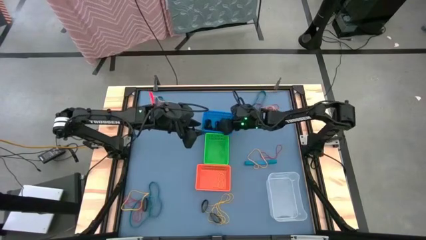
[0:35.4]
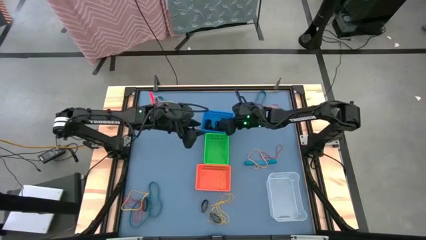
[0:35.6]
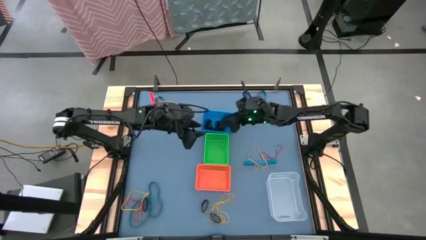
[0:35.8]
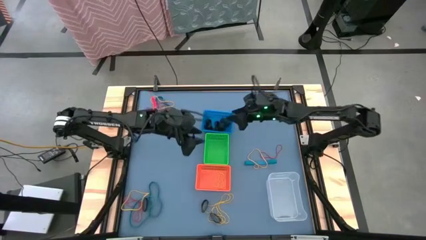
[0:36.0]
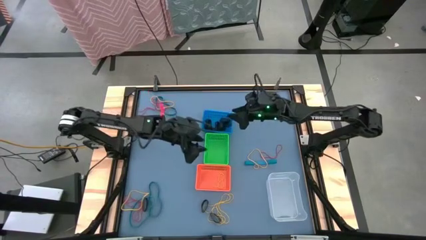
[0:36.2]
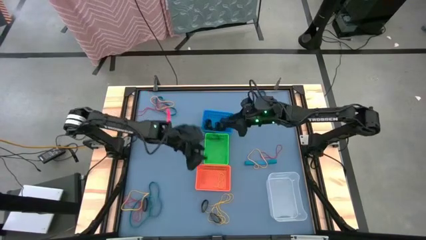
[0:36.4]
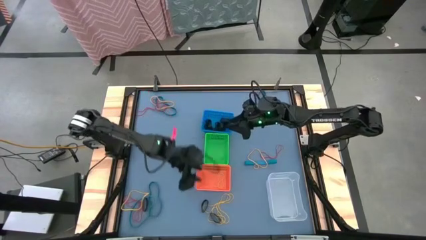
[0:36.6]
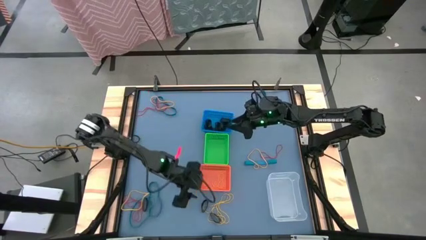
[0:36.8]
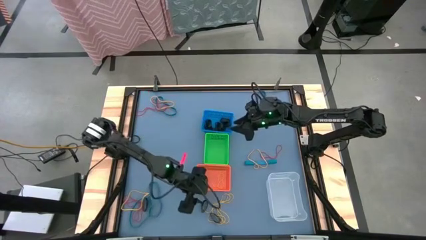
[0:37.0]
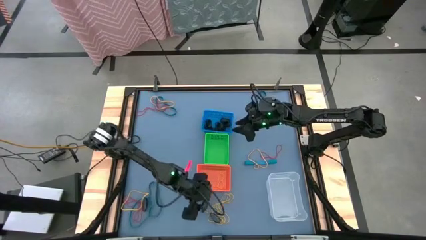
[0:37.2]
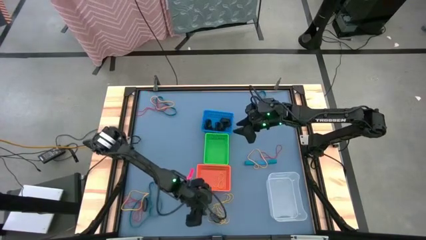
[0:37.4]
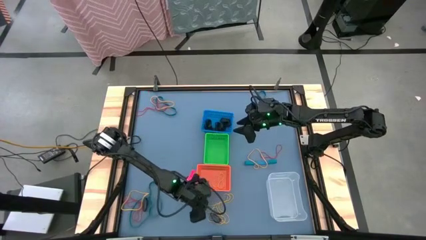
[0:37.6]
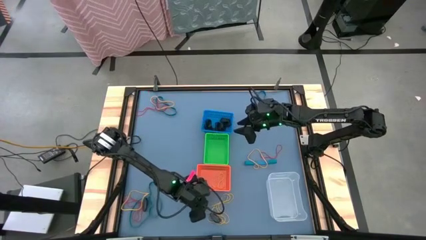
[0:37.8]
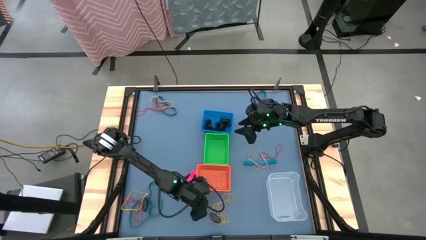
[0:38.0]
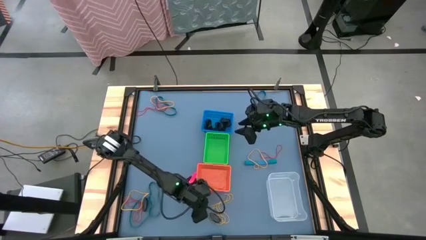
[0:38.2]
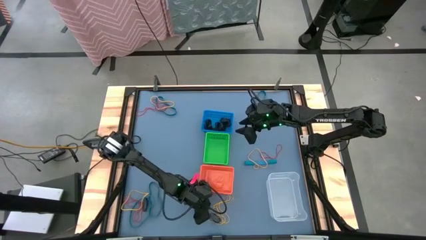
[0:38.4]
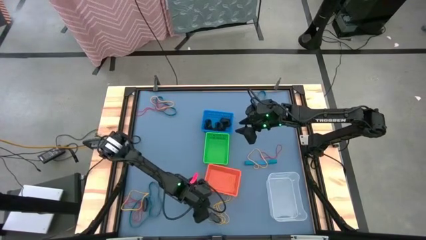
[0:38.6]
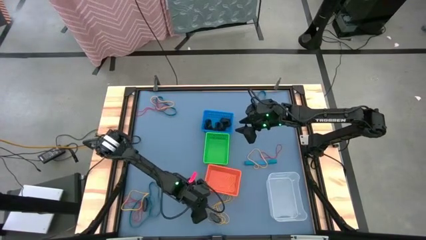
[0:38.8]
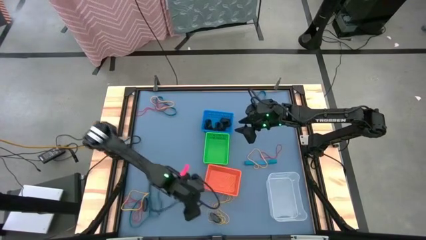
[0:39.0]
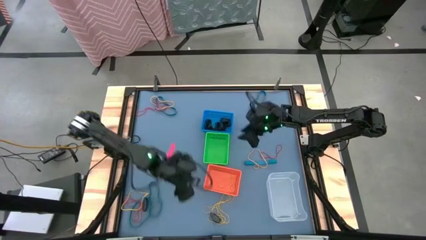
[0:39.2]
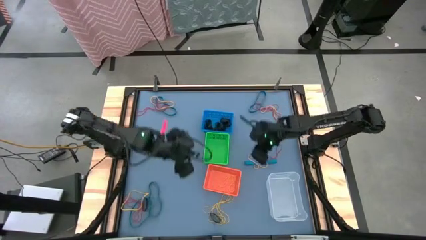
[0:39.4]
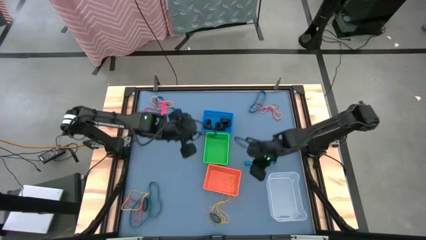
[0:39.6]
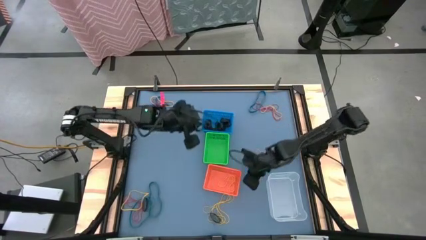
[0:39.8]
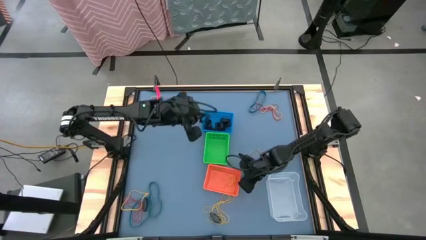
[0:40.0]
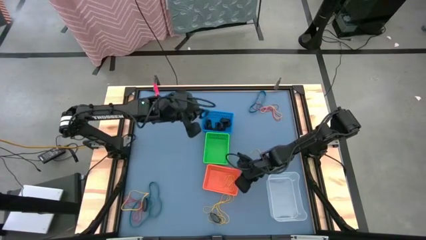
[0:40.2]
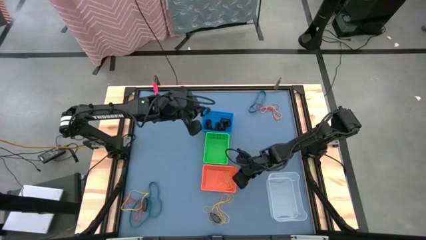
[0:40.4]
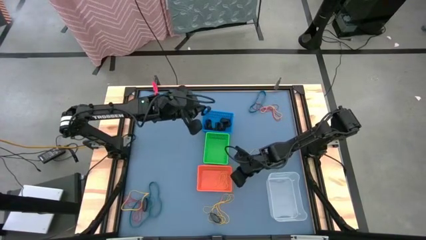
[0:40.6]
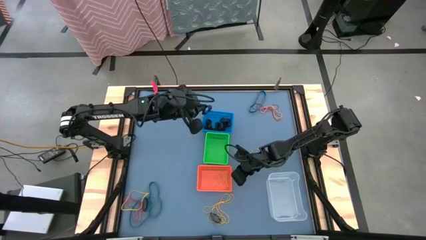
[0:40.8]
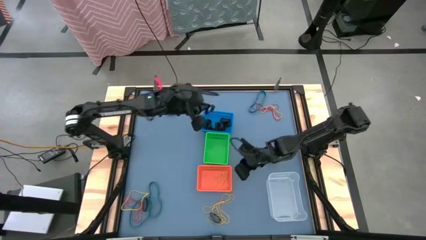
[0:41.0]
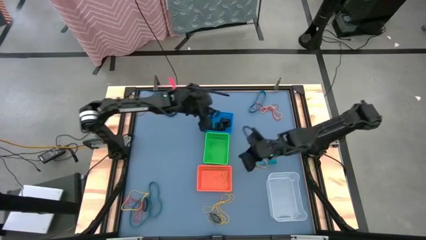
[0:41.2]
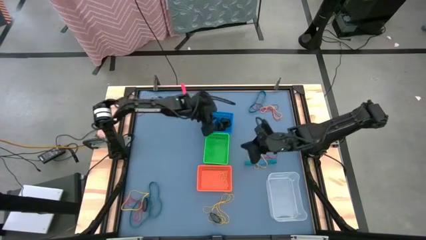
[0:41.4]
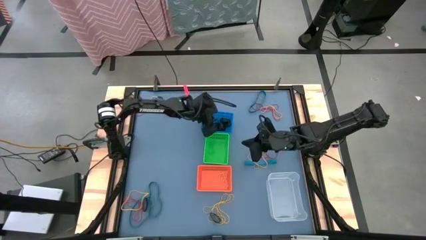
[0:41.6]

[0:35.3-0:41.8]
Task: Sort rubber bands into baskets
Put the black rubber band into the blue bin

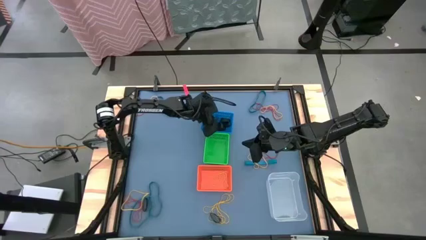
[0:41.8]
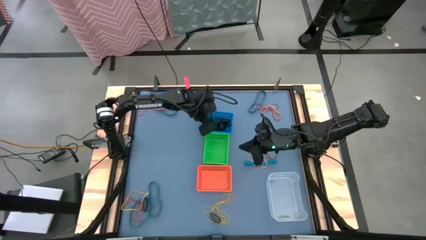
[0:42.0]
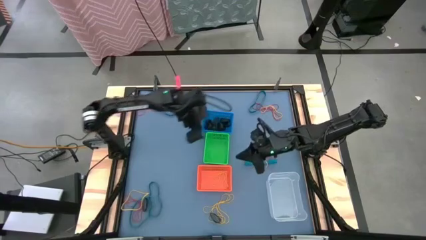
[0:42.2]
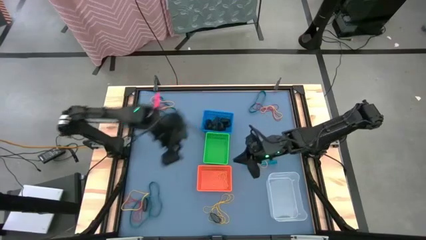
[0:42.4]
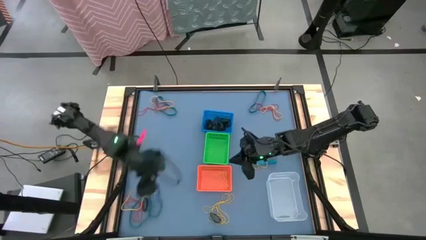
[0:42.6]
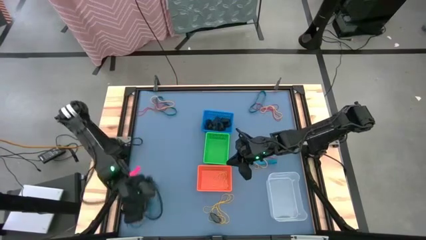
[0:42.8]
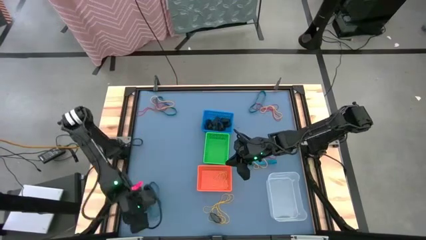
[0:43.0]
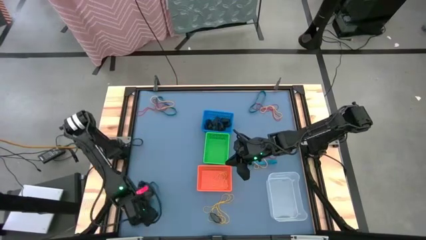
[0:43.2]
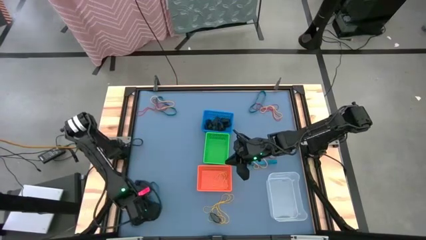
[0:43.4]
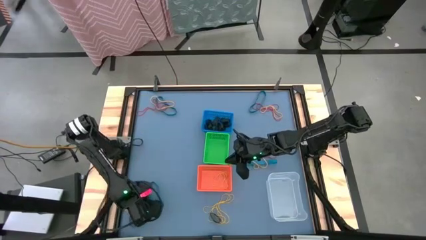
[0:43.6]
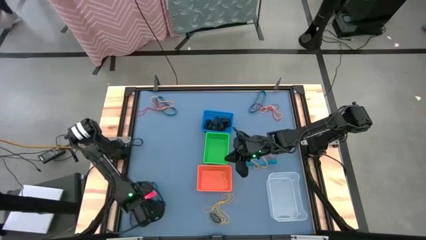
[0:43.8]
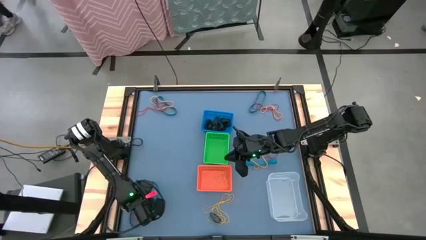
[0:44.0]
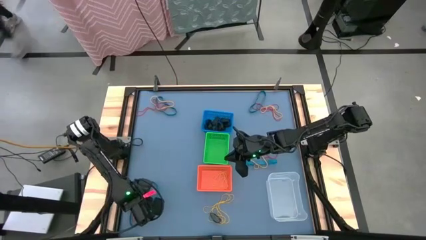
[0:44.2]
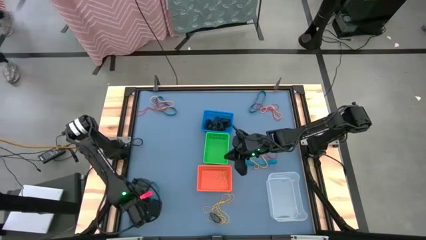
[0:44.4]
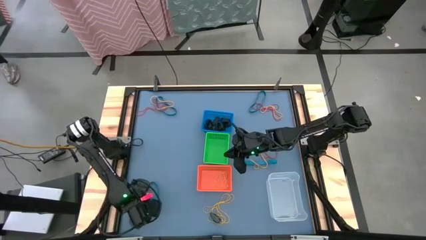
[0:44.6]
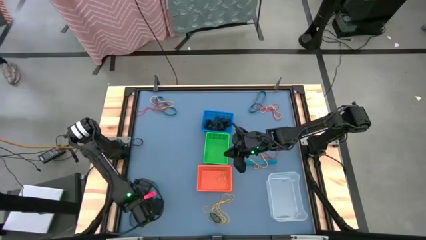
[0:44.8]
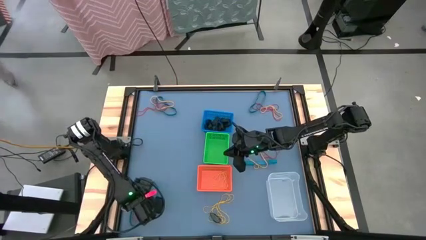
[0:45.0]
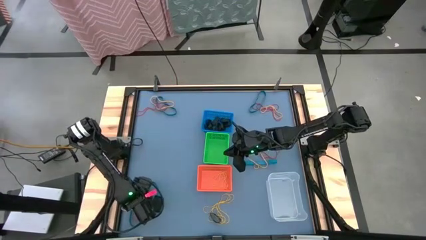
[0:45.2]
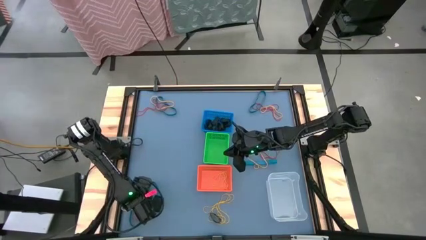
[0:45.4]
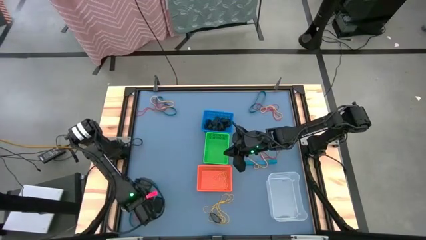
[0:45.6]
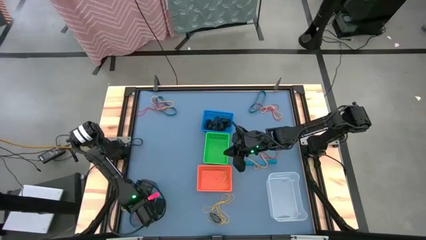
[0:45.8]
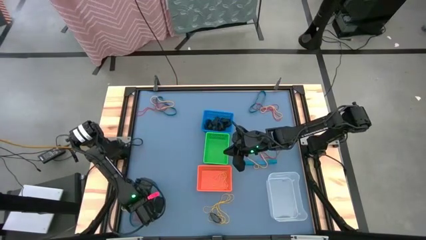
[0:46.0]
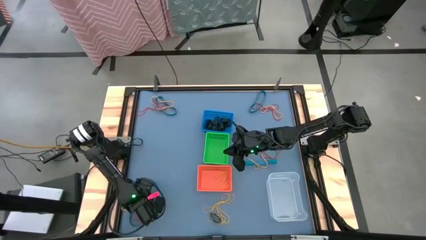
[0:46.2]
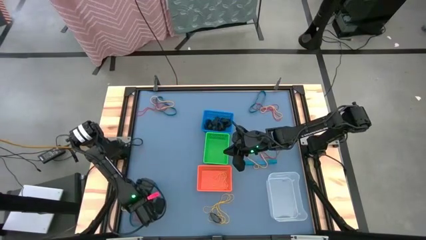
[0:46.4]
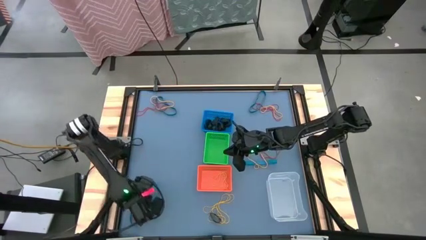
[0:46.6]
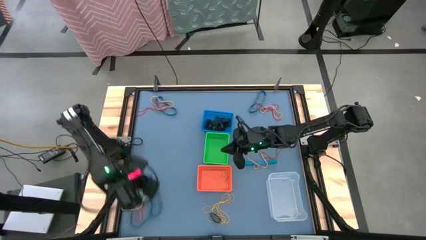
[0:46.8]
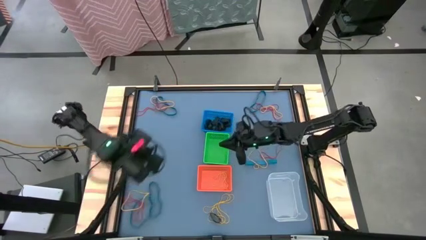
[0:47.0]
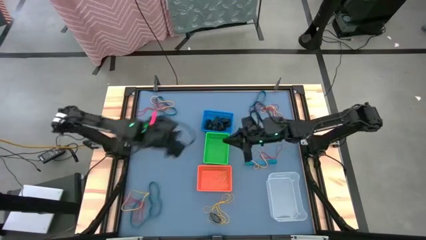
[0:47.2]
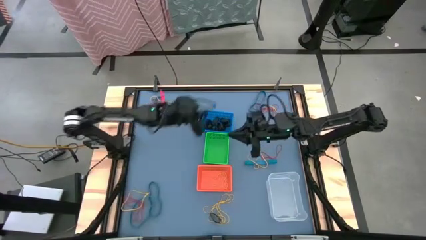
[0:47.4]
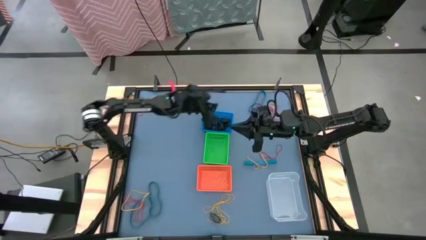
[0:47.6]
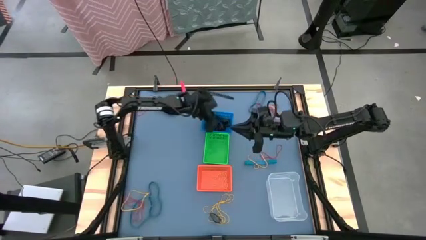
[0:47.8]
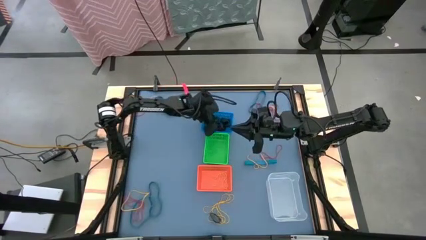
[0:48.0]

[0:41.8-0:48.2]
Put the black rubber band into the blue bin

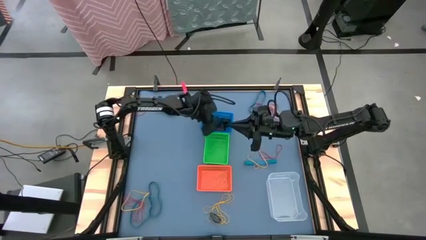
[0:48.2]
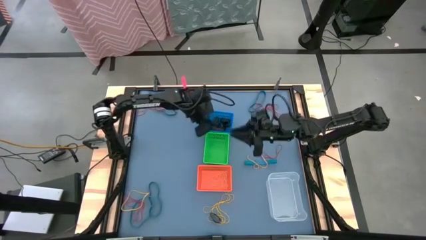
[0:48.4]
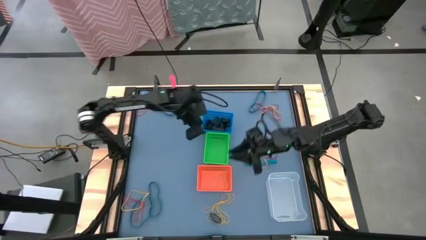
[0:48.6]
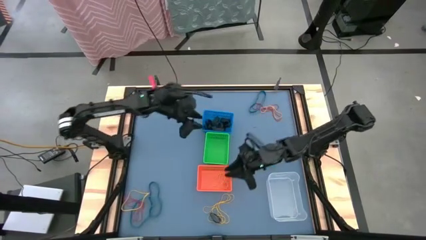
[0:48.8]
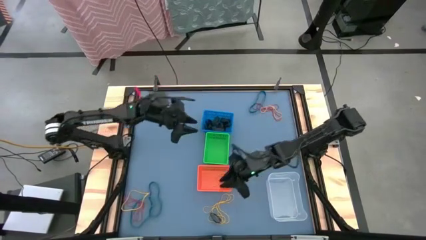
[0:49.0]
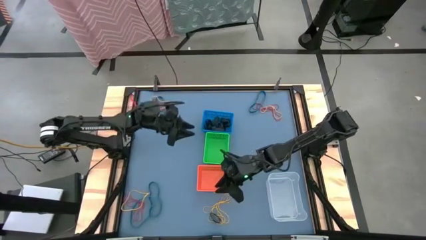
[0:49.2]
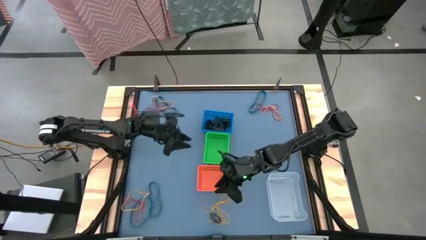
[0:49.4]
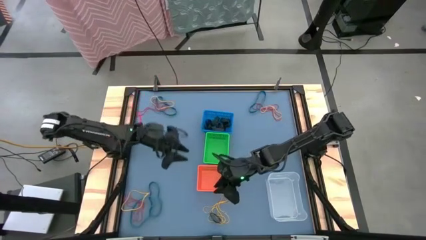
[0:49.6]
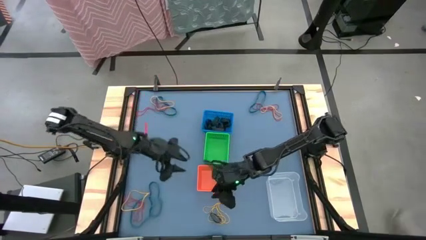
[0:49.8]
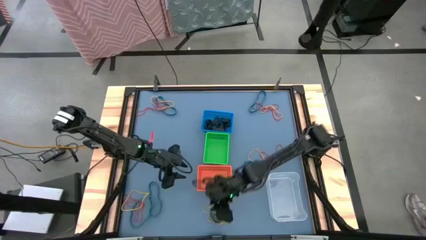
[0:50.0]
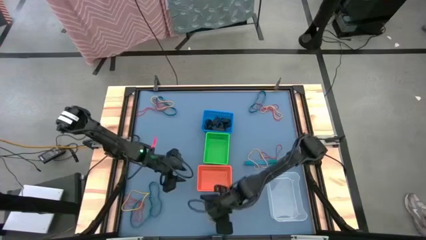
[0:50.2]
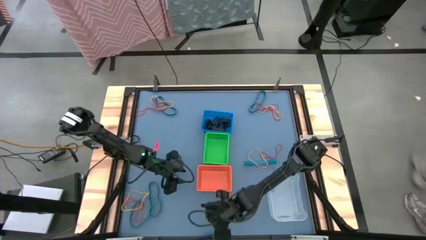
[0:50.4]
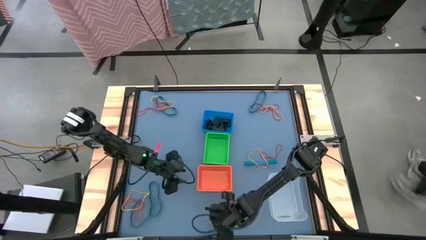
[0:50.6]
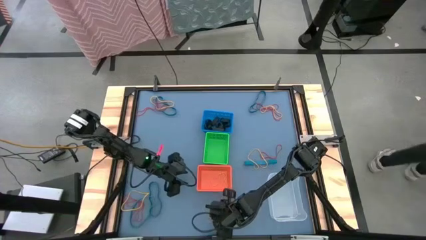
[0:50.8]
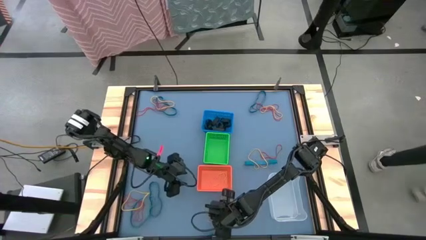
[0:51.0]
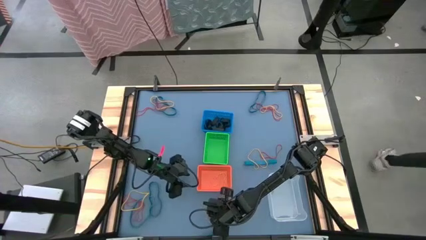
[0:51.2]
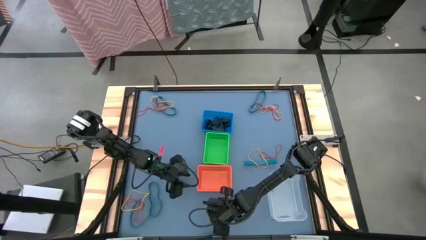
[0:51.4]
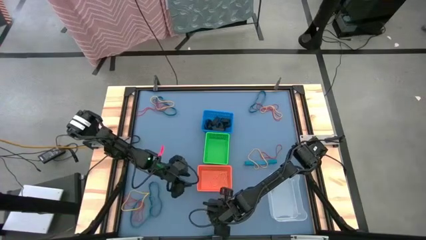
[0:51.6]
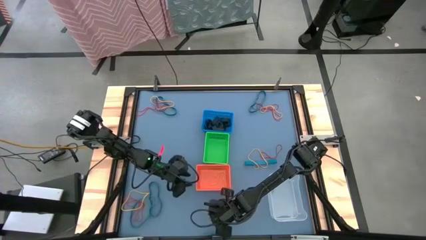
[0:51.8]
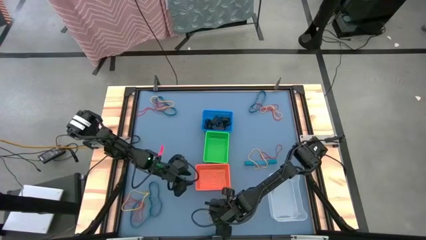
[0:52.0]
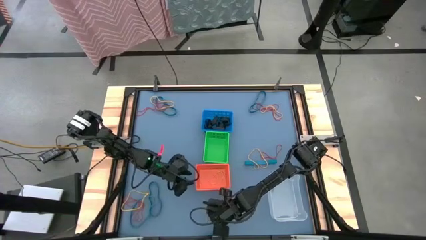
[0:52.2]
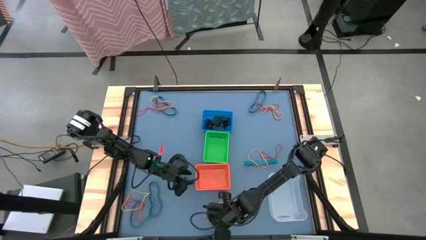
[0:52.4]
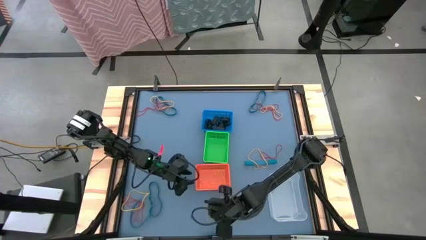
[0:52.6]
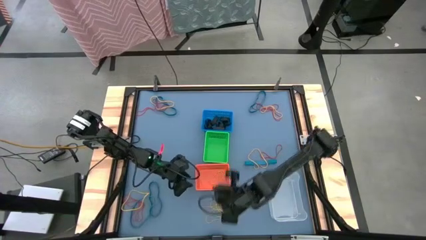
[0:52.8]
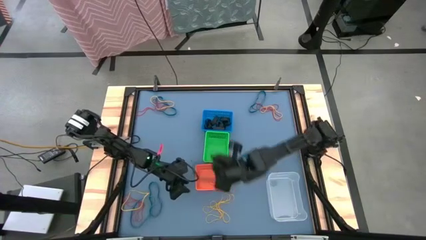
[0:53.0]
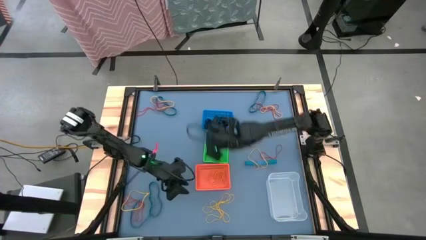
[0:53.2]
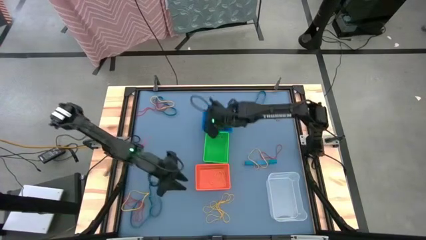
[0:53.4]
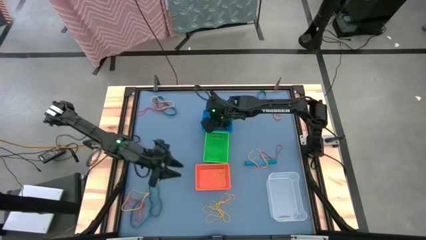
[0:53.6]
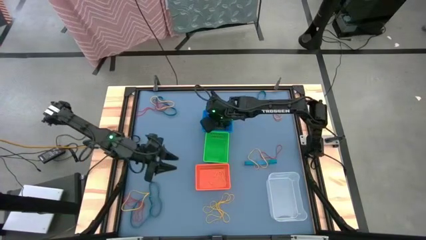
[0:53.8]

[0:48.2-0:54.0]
Put the black rubber band into the blue bin
